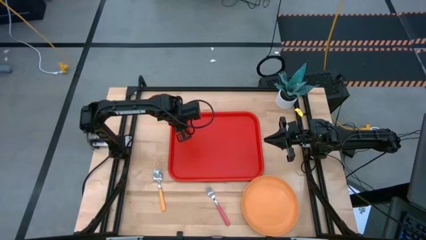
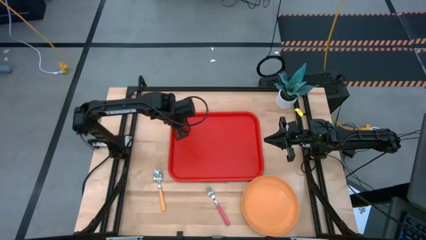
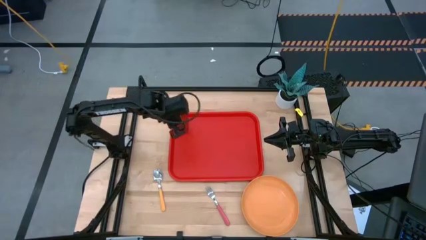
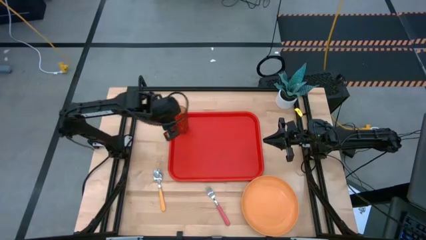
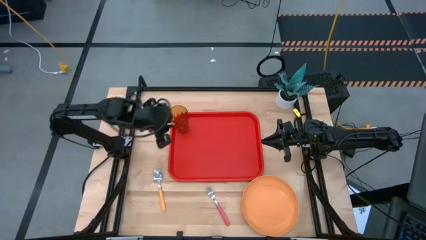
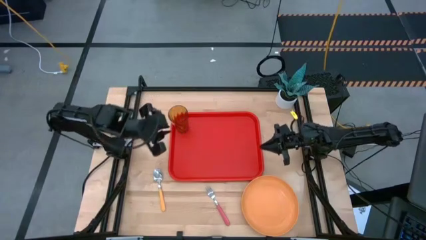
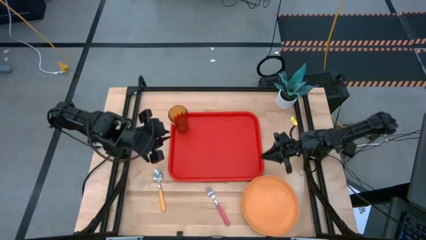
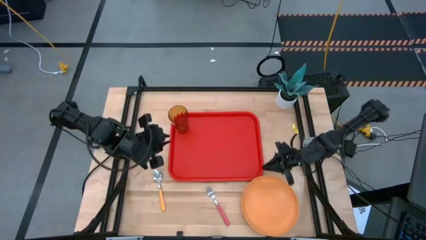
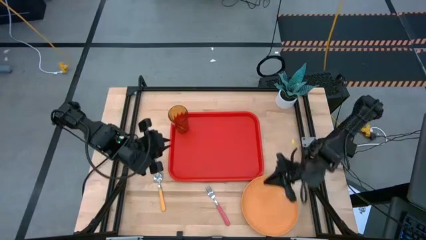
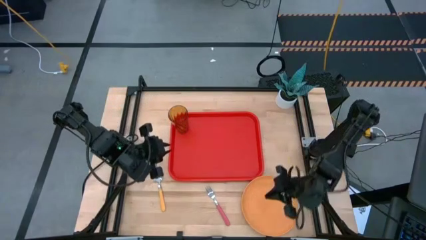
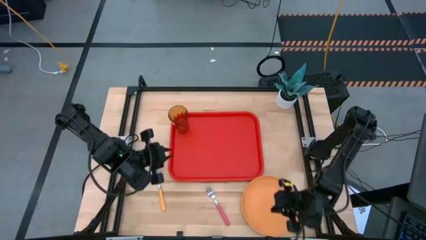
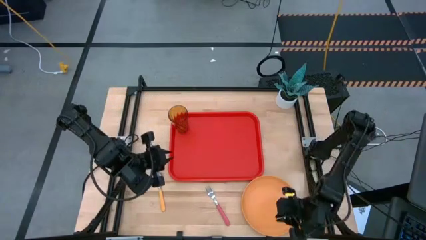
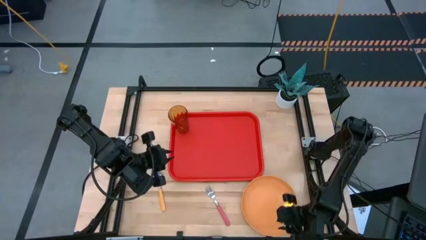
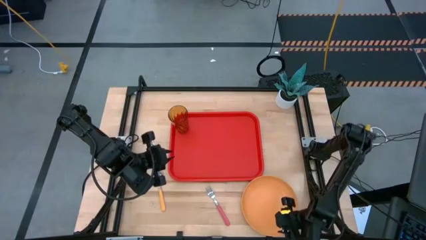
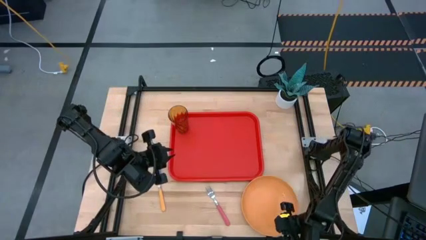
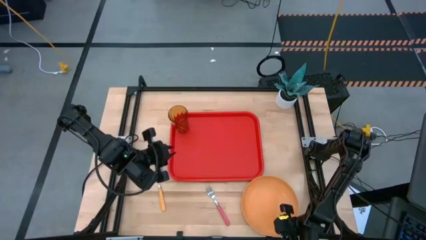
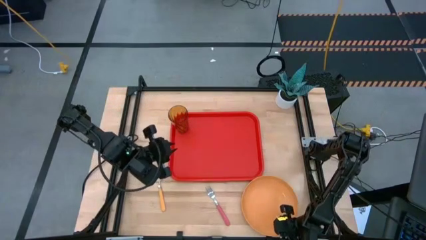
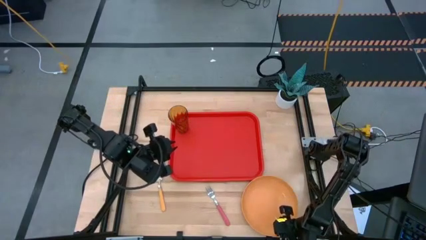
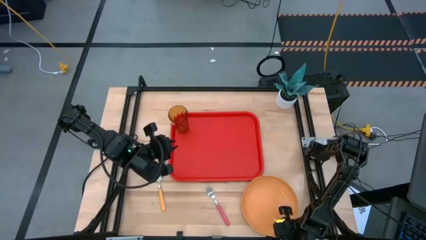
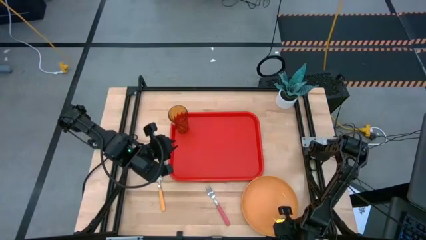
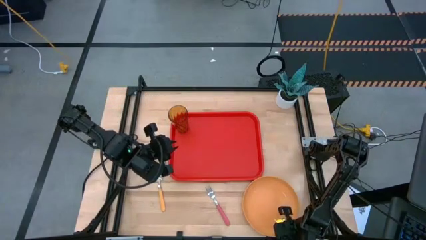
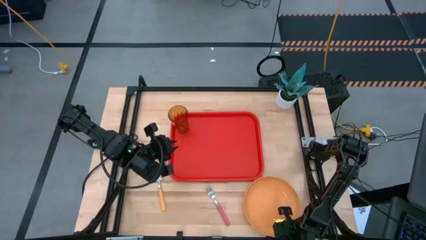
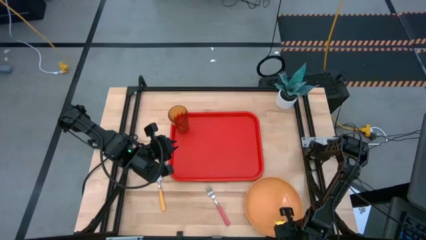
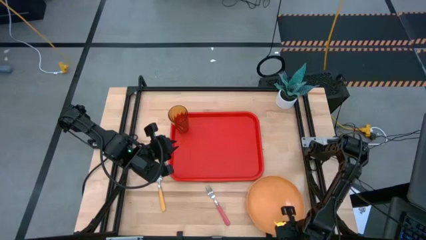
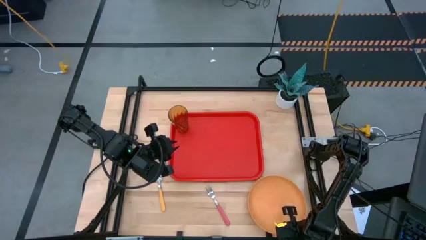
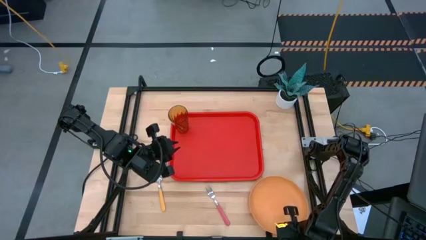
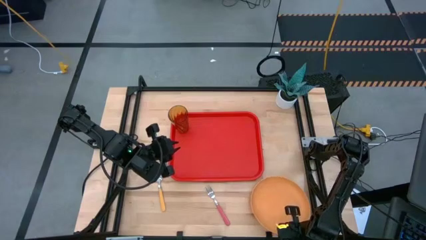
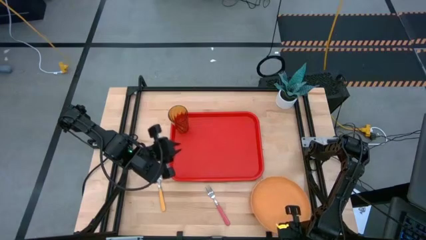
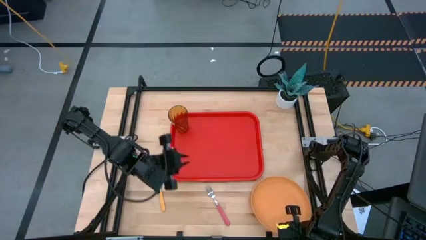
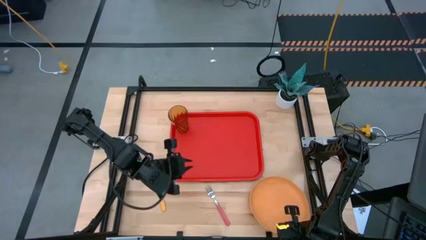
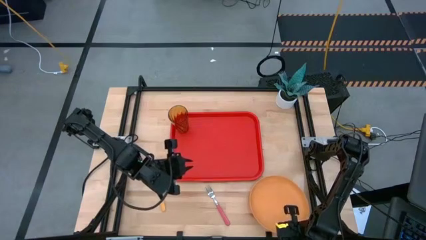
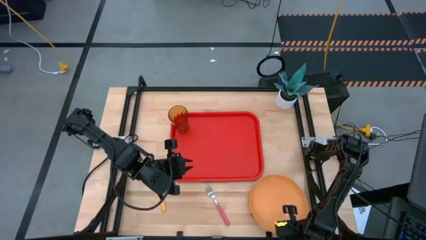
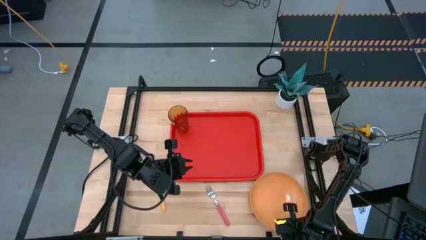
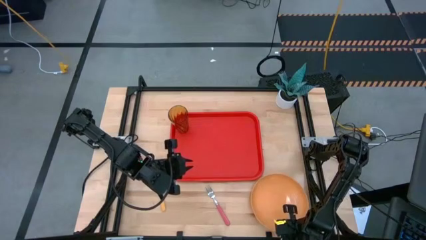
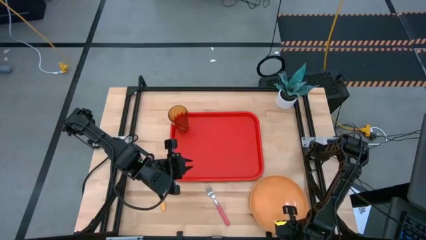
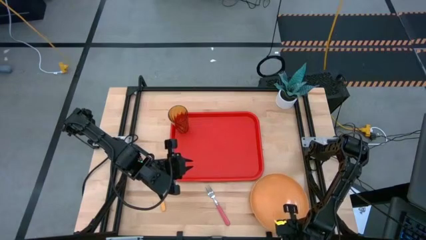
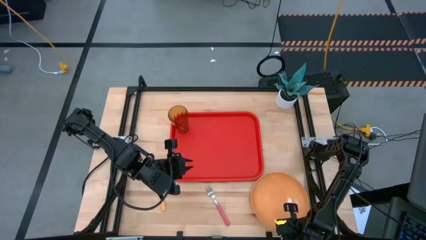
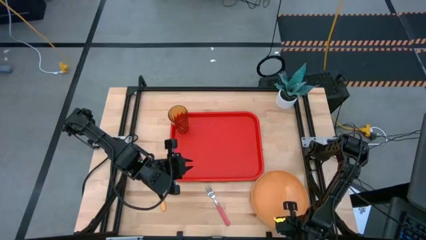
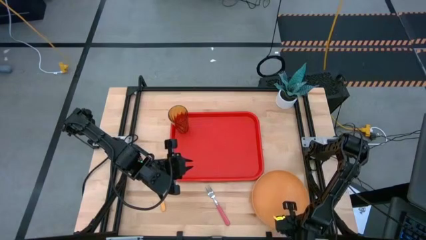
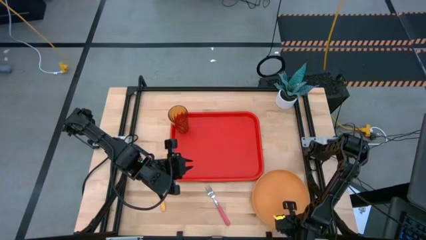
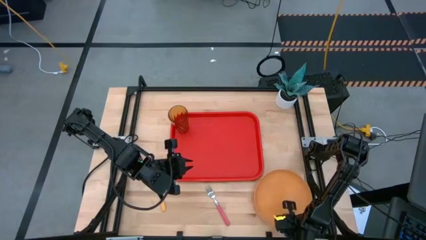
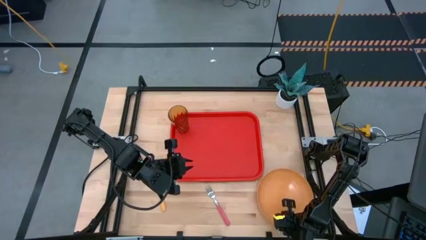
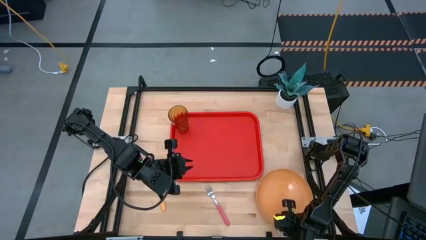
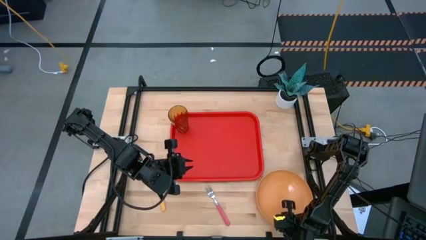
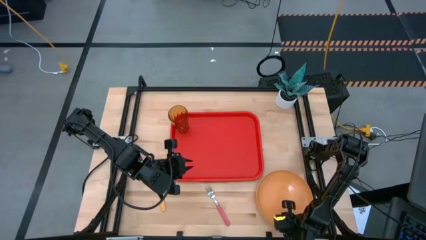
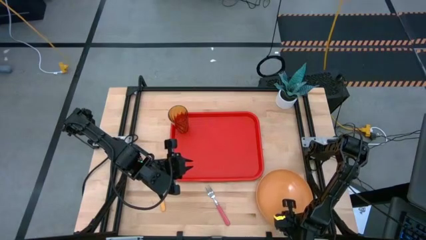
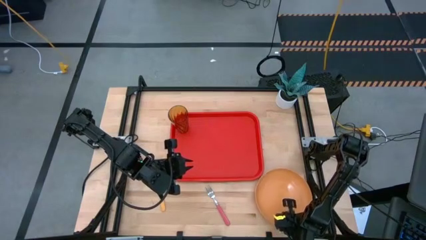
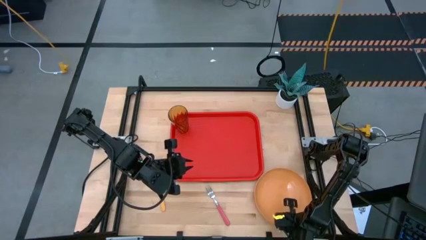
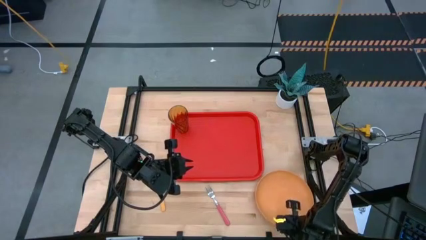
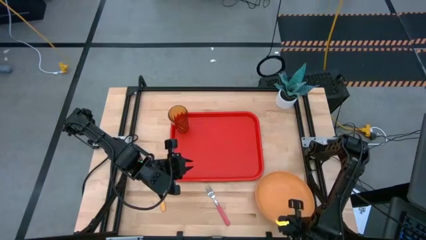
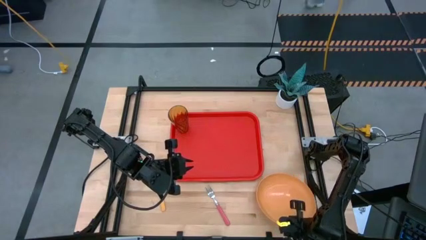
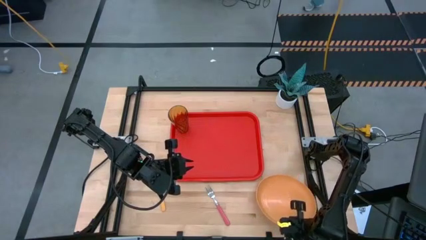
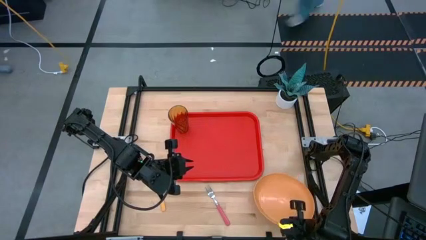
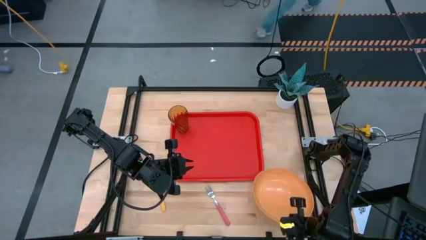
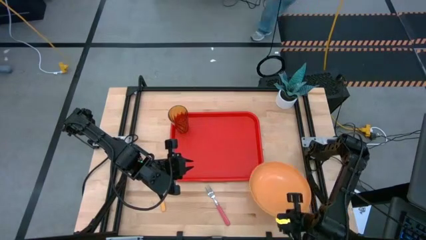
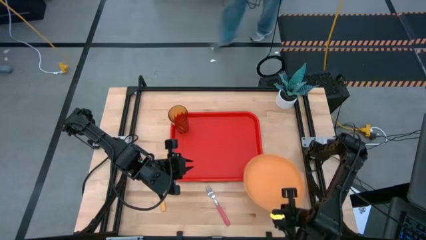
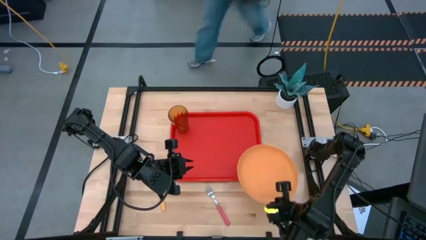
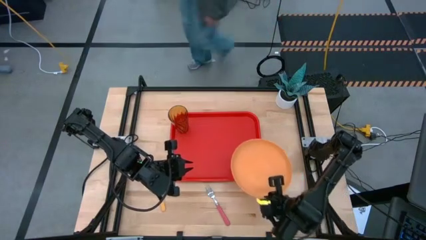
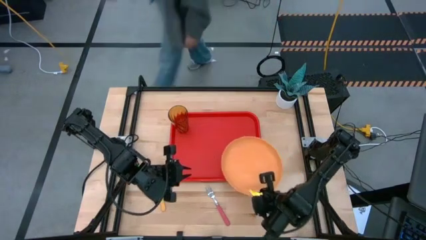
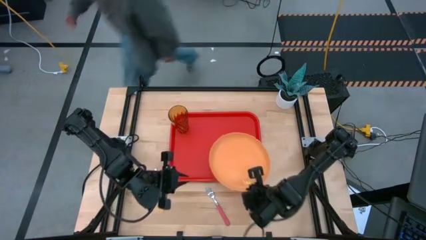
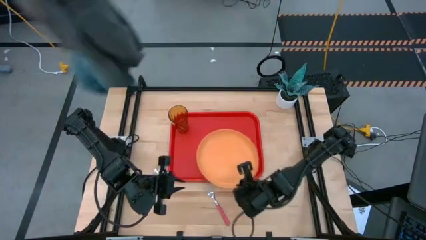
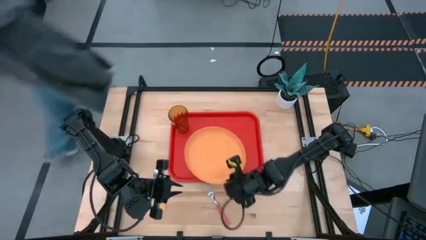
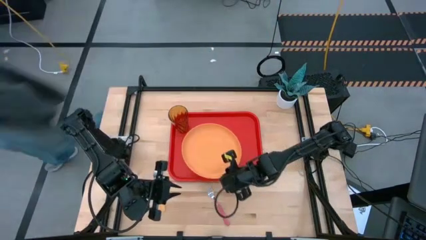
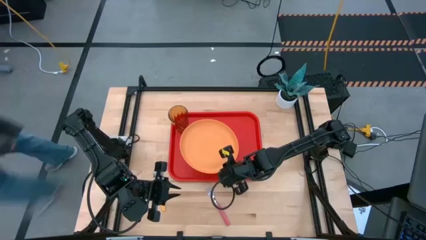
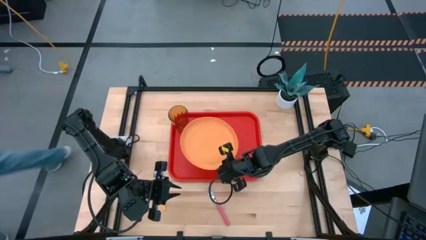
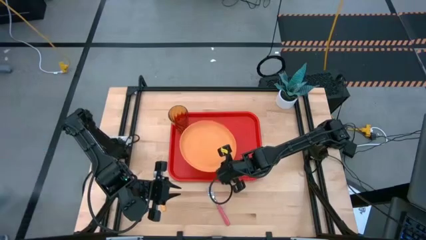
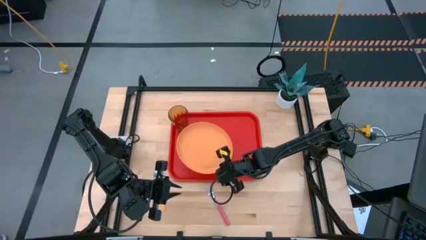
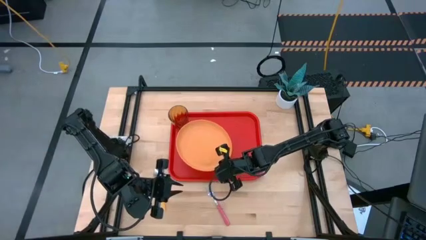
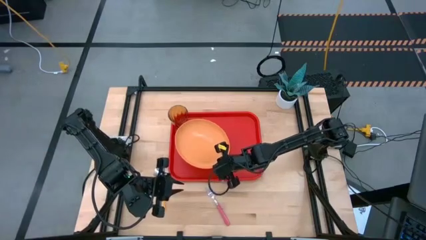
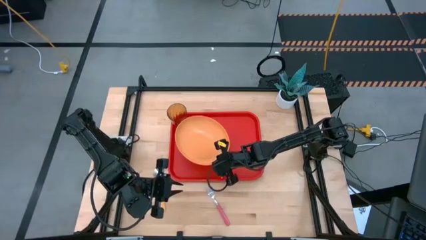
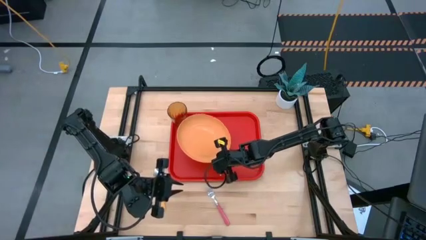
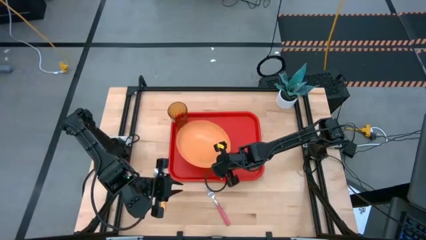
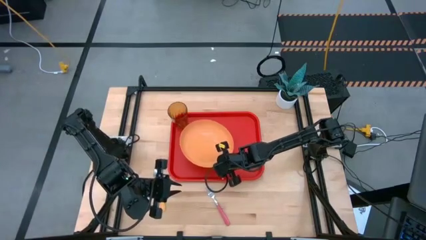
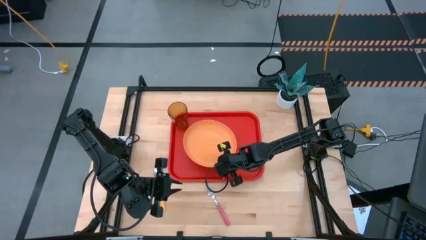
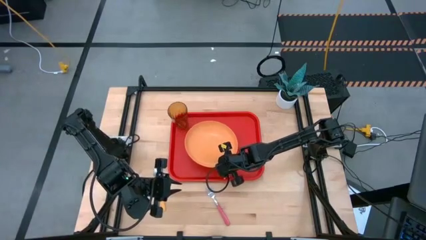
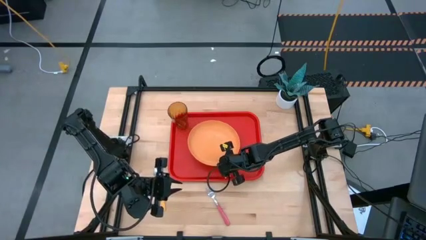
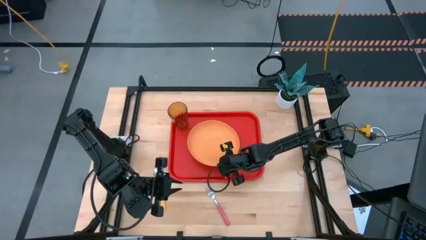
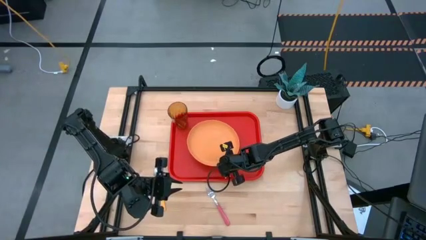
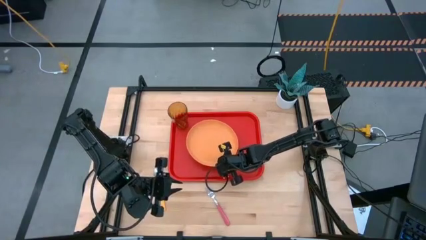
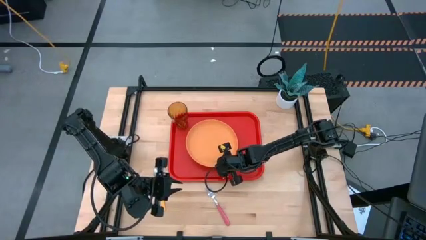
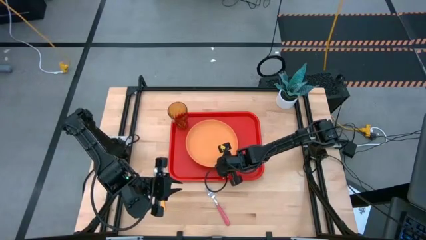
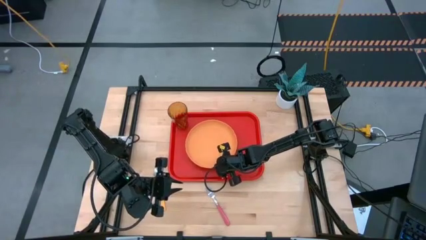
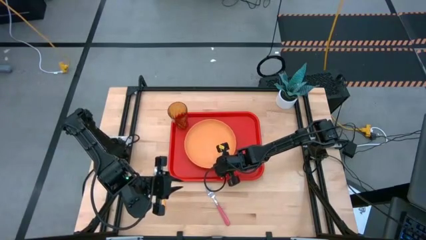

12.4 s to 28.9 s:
Task: Pick and place plate/cup/fork/spoon on tray
Put the orange plate on the red tray to the bottom right of the brown cup
